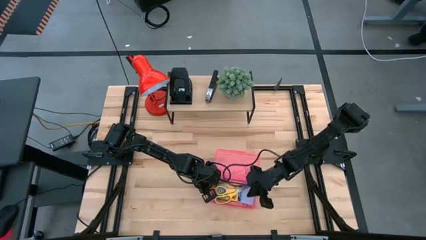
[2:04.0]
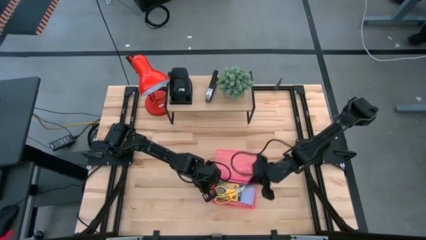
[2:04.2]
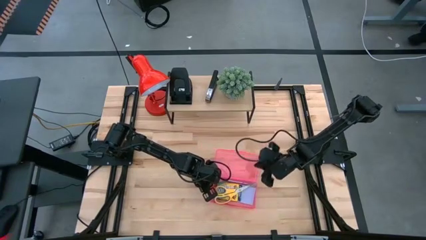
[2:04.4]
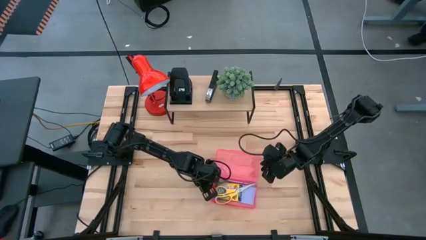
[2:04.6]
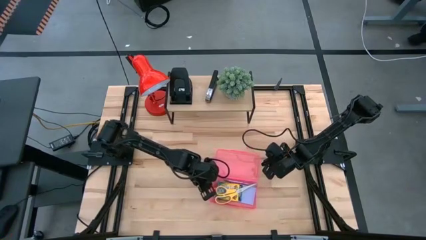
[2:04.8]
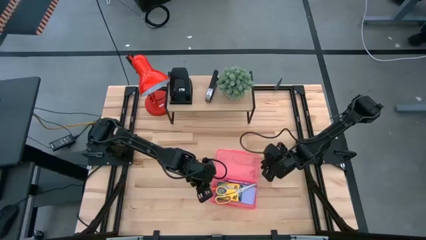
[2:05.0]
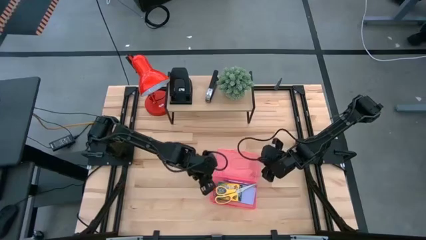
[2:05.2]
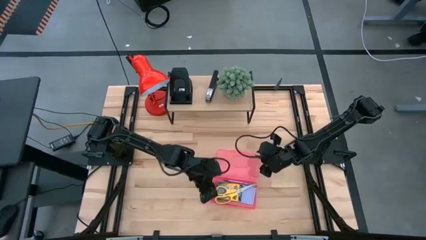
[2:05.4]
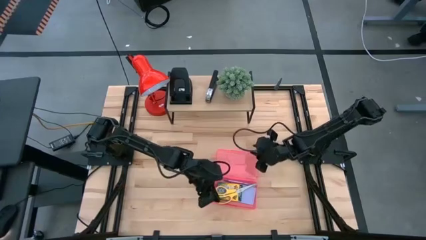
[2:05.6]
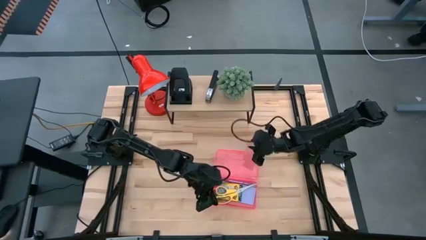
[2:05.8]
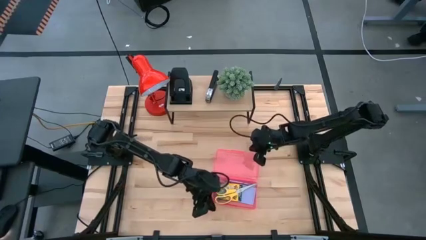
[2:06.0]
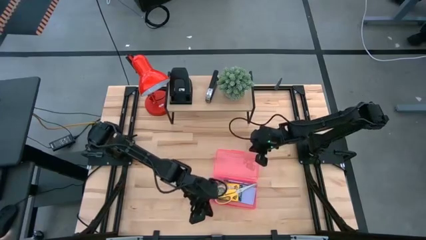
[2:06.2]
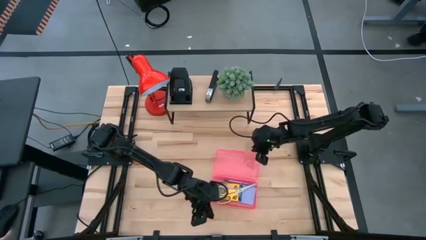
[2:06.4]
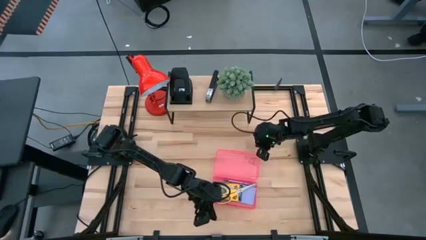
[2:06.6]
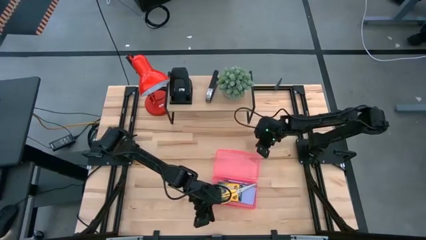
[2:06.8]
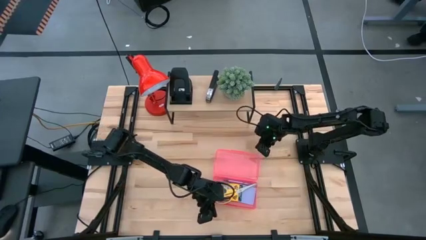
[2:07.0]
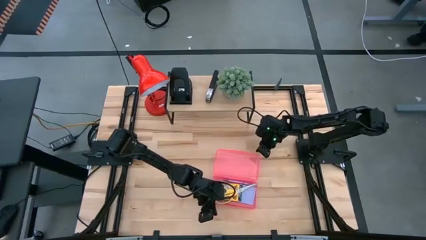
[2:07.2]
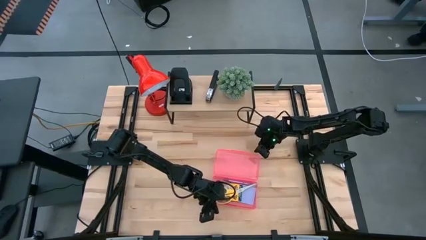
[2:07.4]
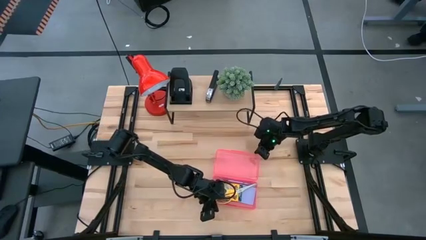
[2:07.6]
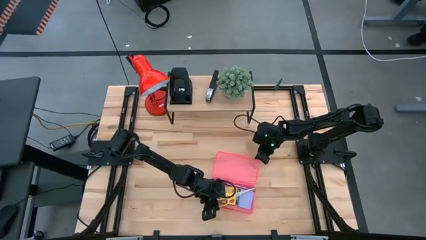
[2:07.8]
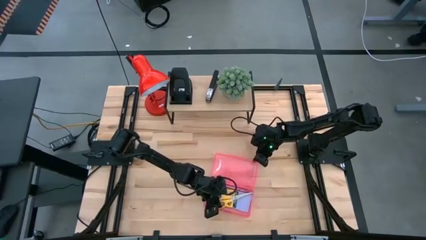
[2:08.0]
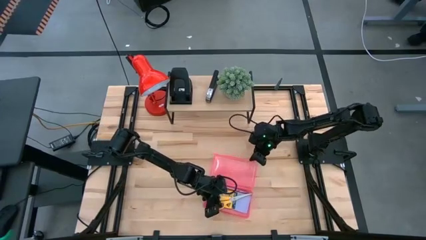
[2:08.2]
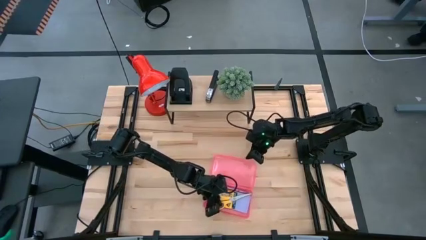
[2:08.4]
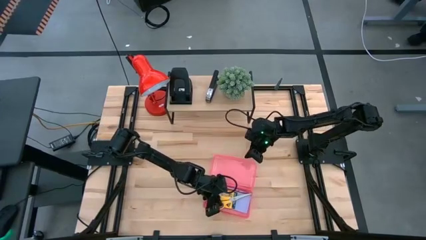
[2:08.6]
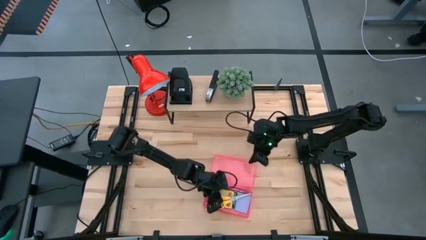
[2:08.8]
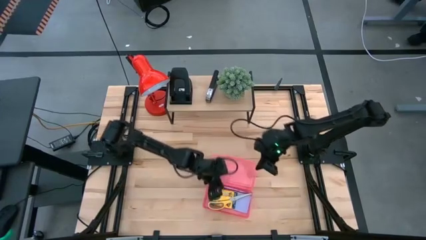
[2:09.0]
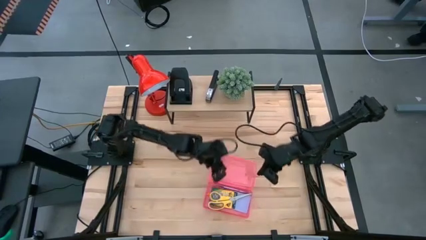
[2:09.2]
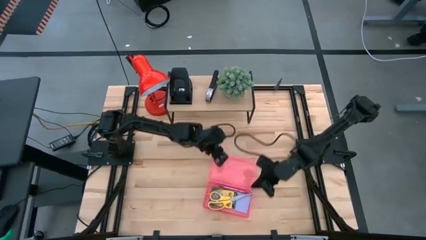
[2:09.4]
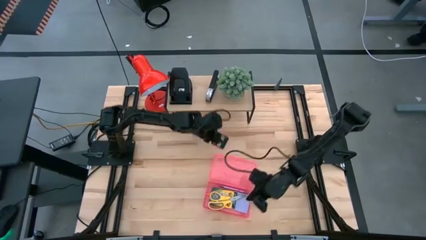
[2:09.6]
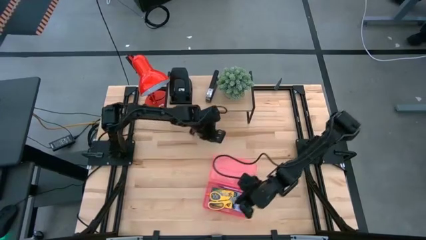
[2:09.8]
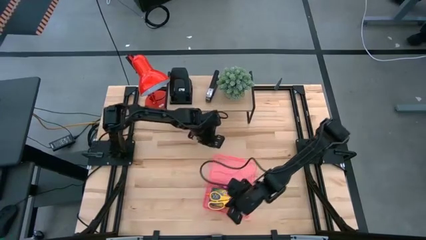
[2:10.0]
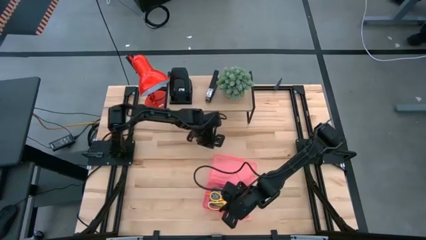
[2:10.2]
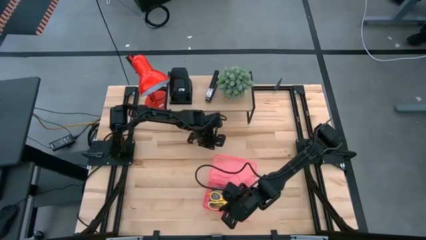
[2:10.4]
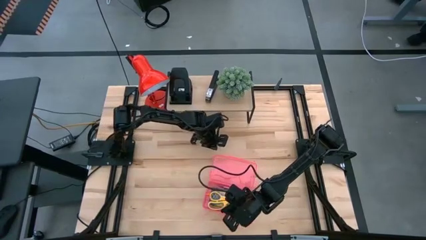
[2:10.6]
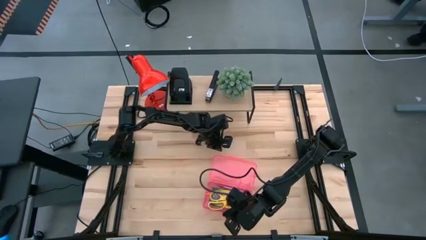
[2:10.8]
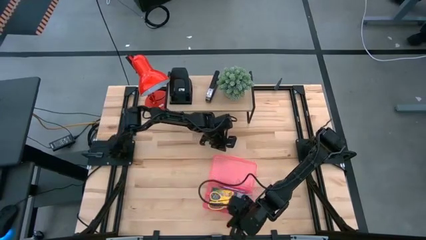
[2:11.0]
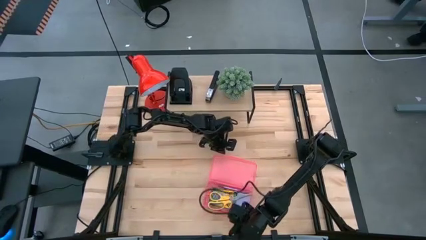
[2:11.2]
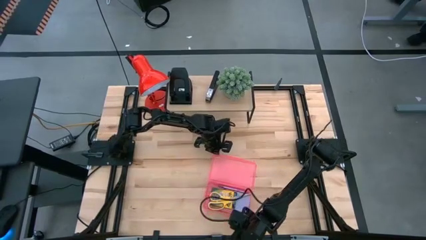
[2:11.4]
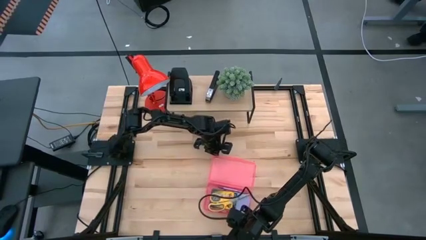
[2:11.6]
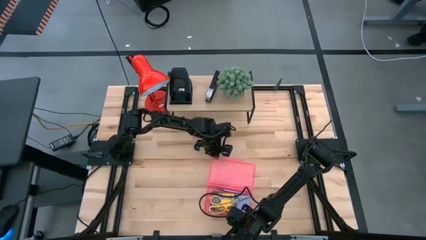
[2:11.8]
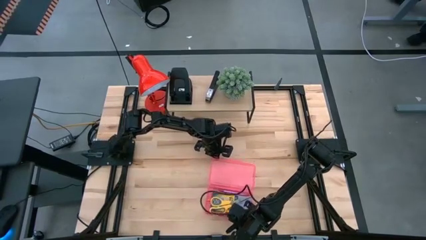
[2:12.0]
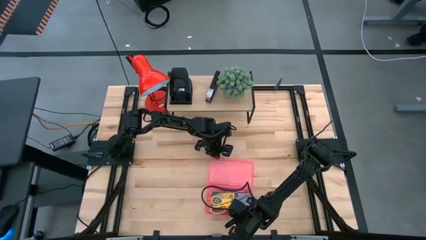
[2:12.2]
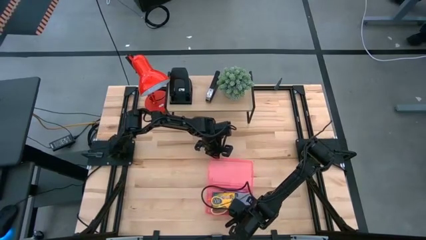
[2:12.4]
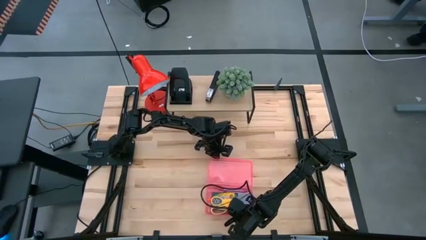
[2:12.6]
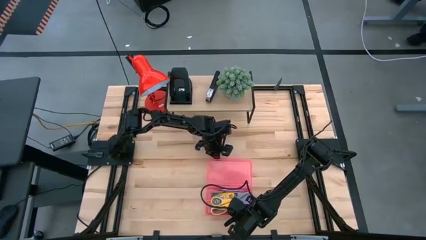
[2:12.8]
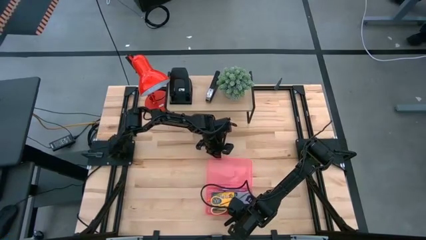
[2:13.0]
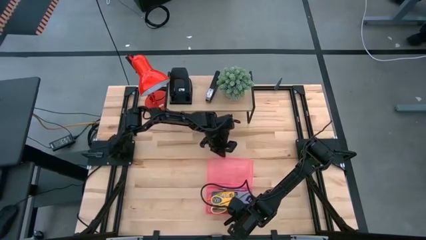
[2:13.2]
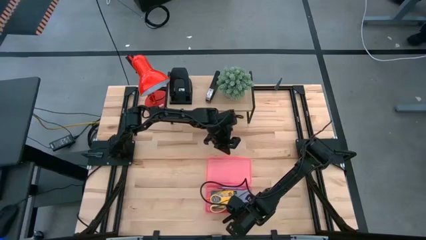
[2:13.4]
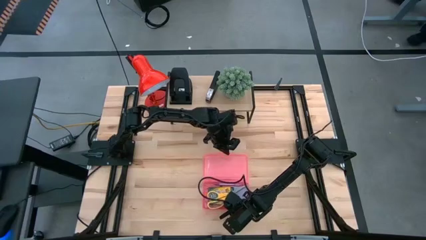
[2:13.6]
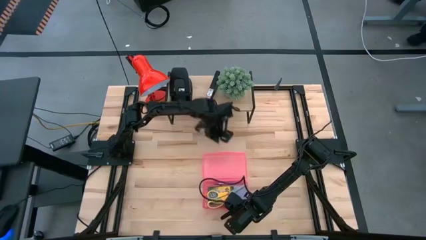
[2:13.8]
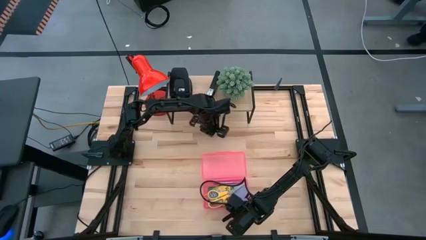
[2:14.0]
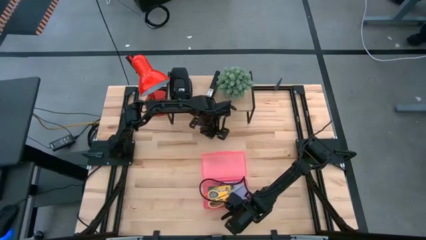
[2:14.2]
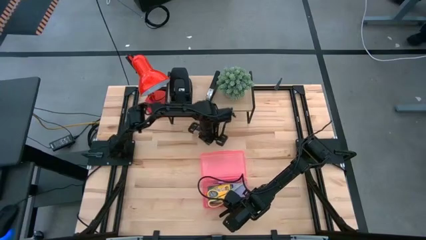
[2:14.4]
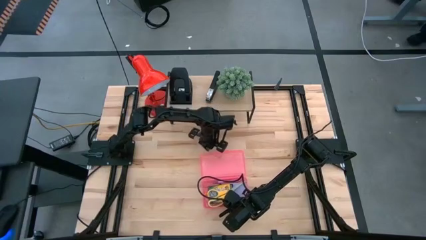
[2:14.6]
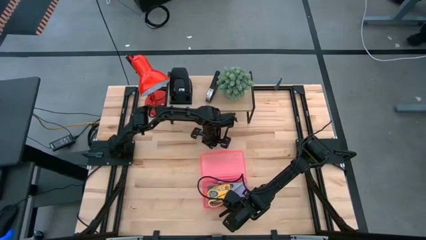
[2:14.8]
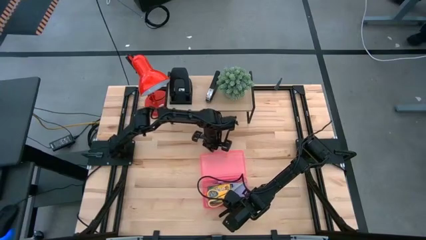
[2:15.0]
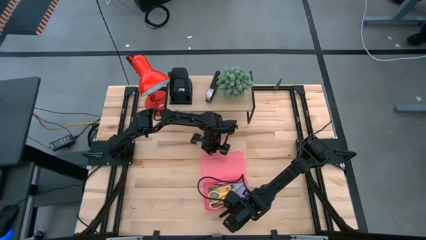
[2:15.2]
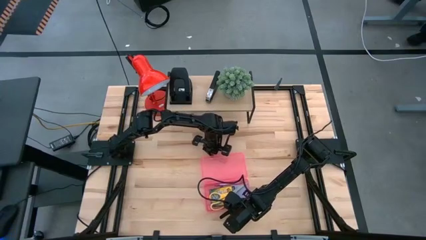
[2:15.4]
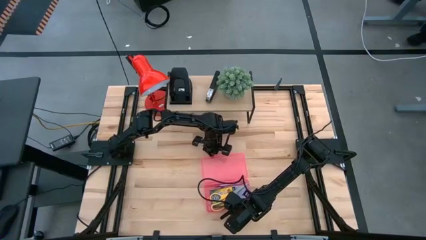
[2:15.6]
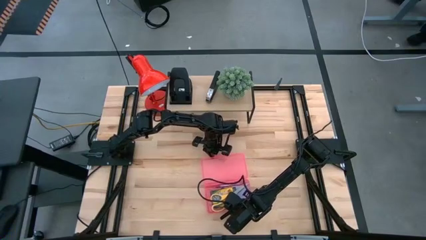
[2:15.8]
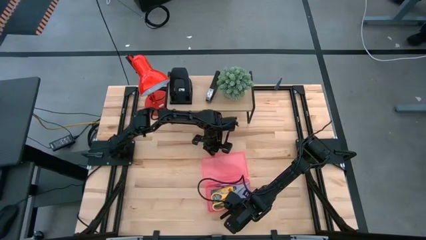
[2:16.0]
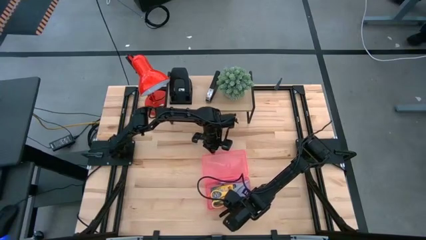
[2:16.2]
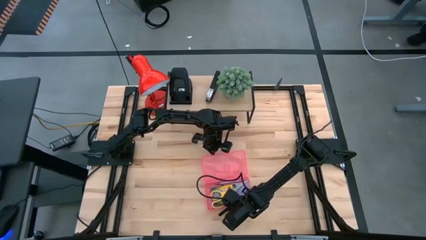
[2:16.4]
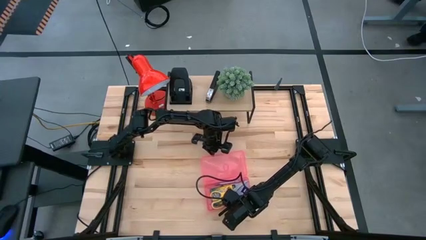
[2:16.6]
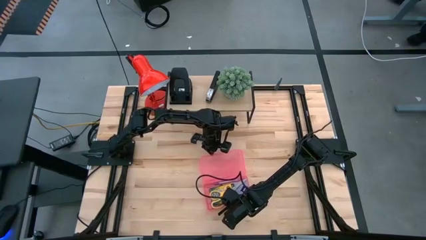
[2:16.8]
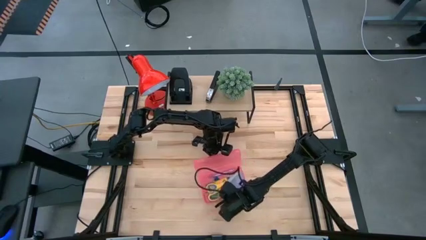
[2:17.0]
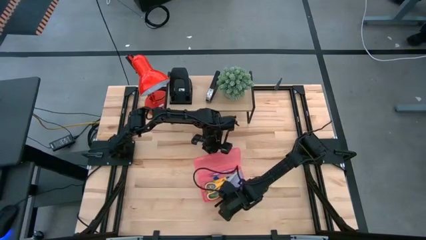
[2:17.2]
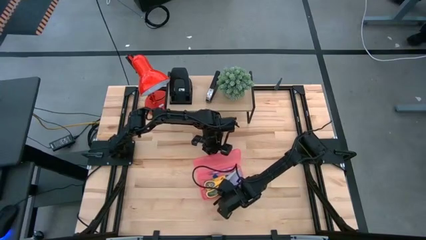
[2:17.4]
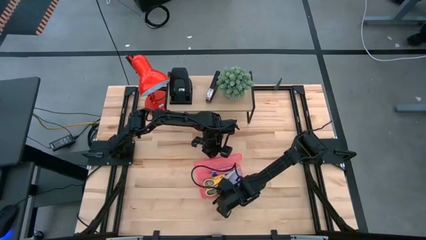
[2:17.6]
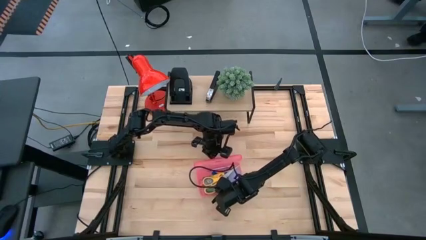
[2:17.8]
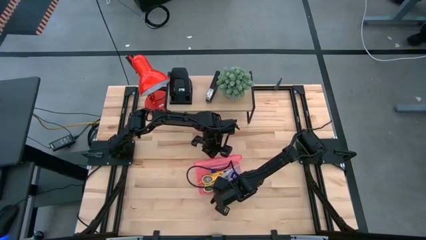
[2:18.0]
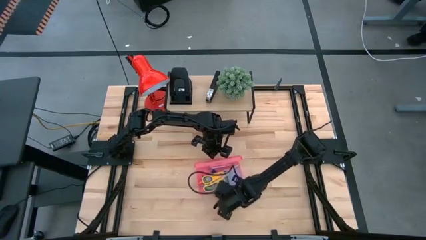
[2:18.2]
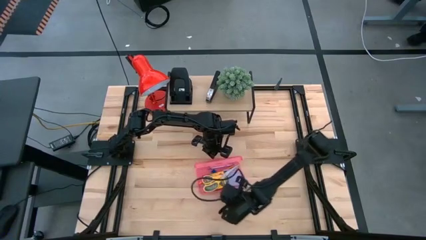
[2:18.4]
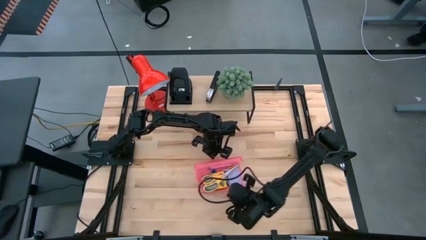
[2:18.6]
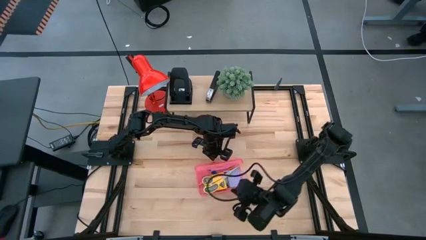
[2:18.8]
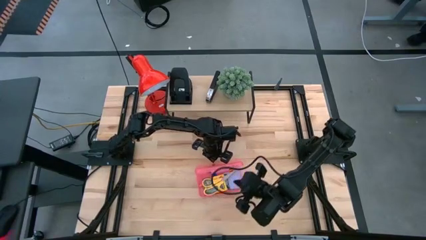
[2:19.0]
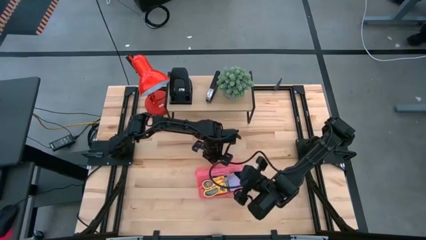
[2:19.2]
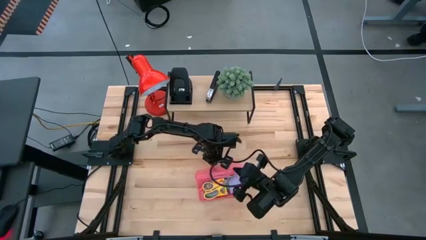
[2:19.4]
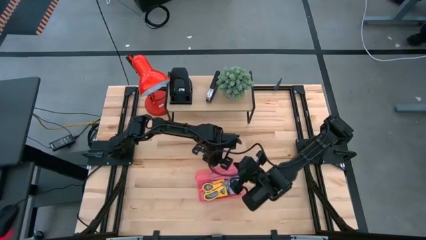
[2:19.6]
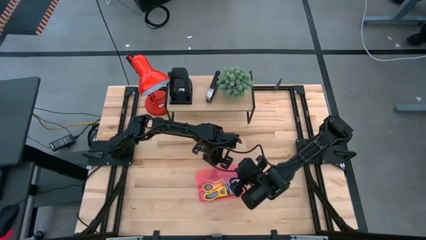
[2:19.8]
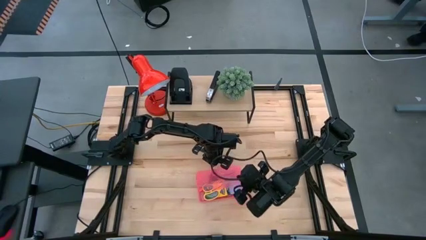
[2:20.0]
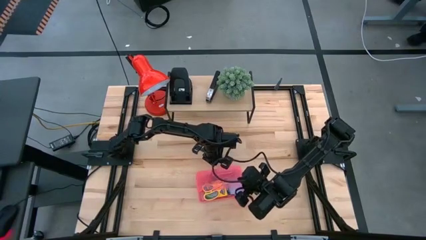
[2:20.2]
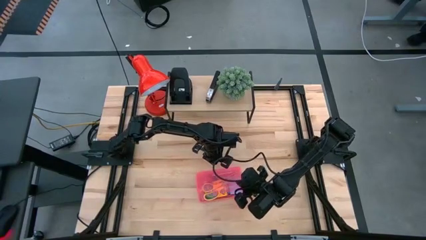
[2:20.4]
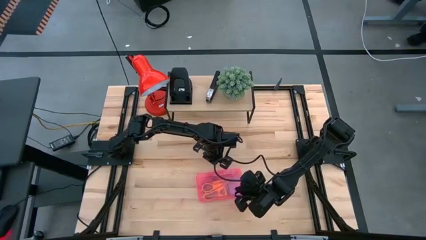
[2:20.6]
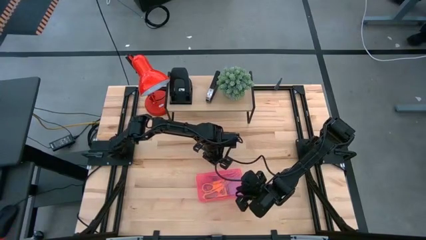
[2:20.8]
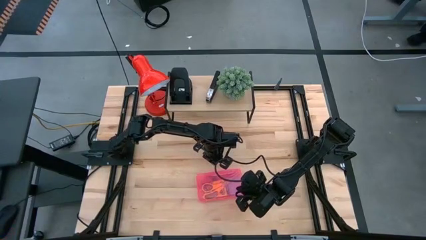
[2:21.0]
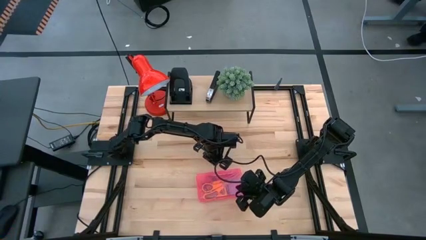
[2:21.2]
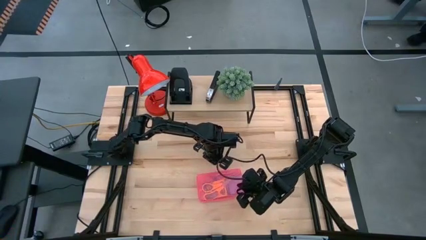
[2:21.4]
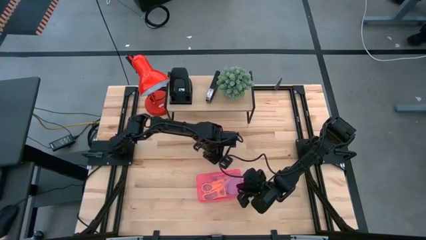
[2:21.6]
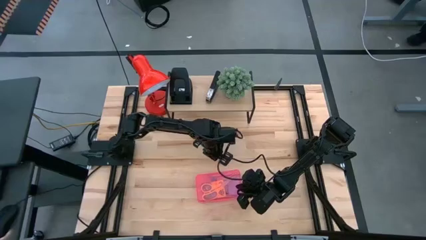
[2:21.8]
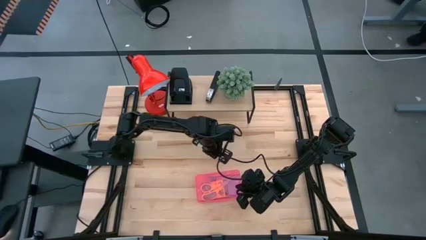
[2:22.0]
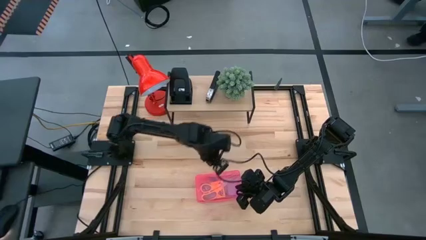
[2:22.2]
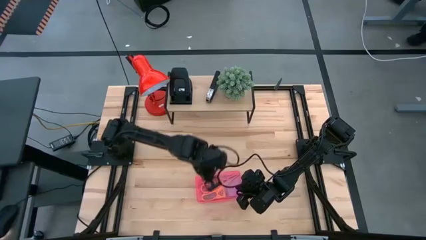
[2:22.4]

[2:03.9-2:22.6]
Task: Pack school essentials
Close the pink supply box
